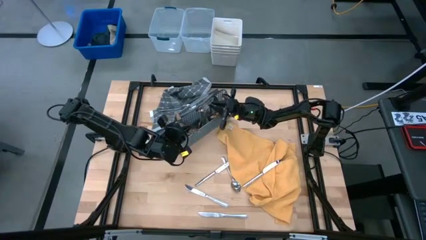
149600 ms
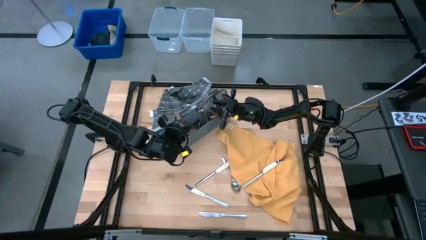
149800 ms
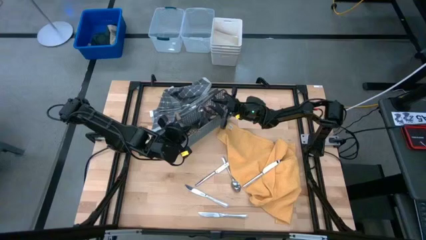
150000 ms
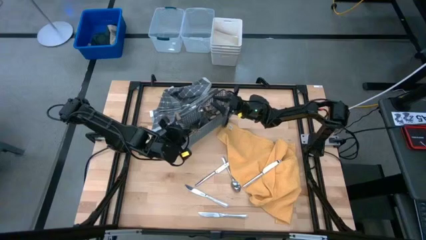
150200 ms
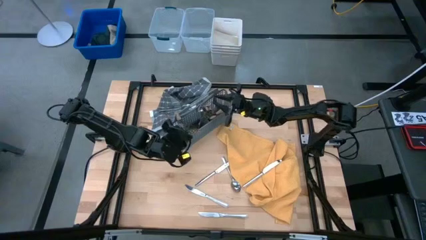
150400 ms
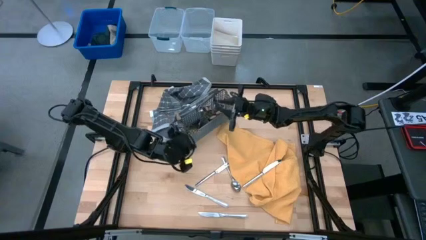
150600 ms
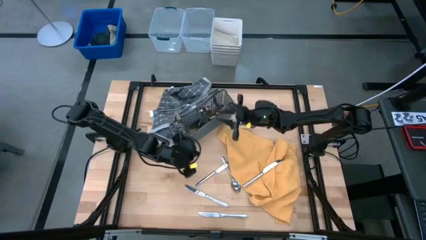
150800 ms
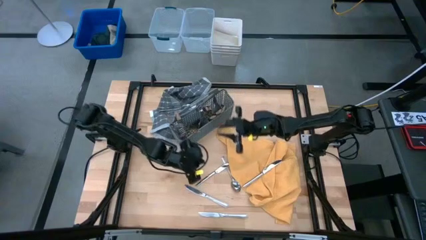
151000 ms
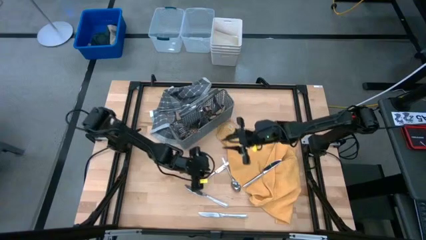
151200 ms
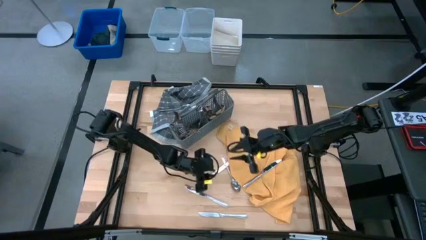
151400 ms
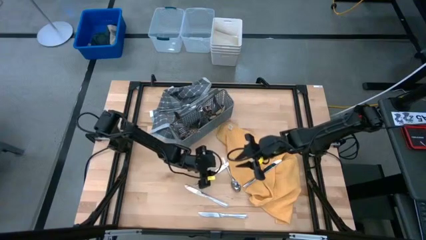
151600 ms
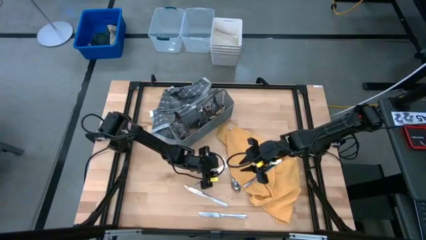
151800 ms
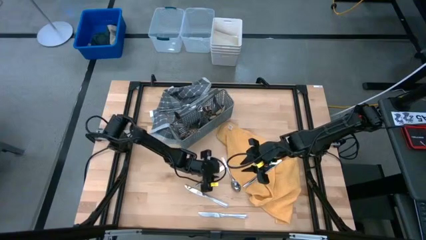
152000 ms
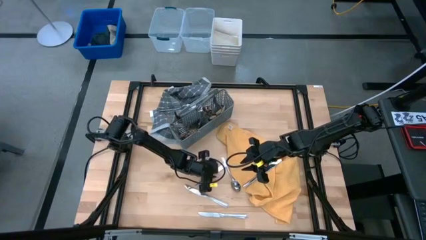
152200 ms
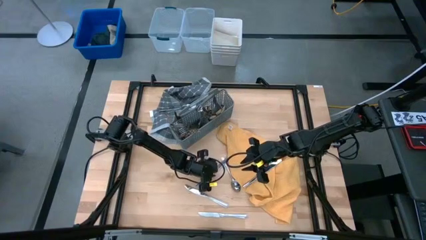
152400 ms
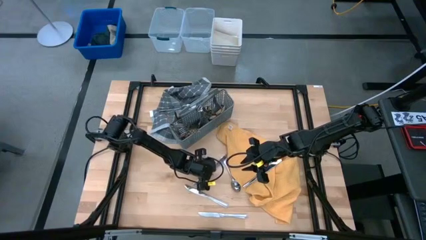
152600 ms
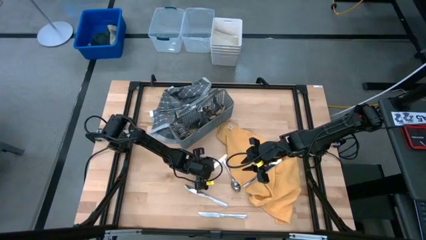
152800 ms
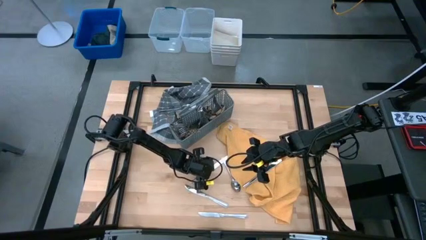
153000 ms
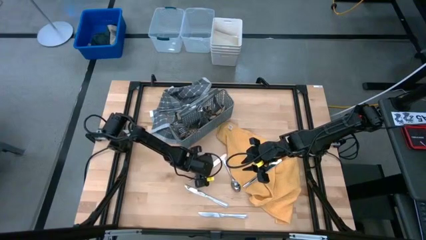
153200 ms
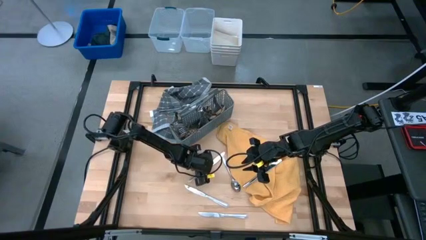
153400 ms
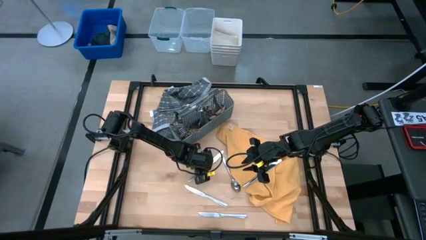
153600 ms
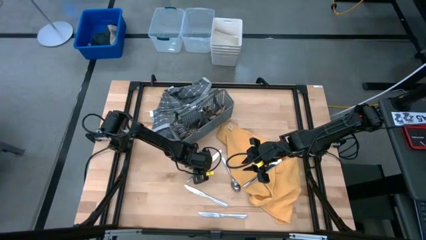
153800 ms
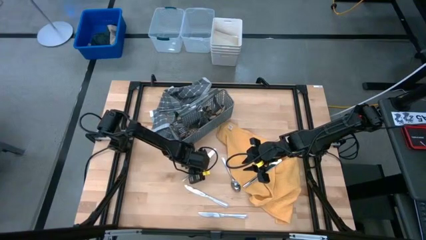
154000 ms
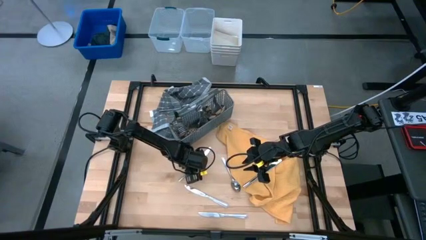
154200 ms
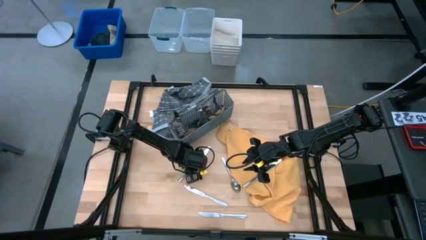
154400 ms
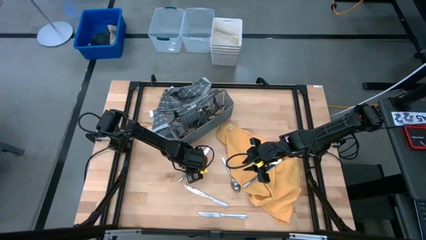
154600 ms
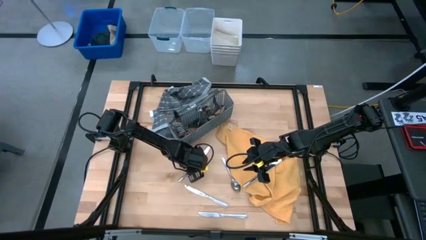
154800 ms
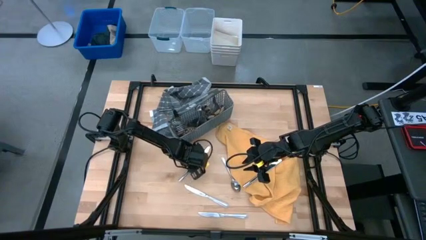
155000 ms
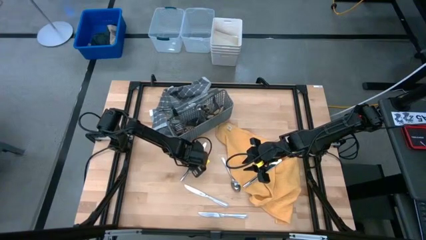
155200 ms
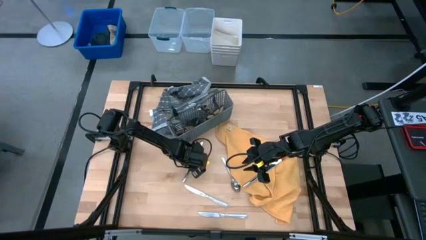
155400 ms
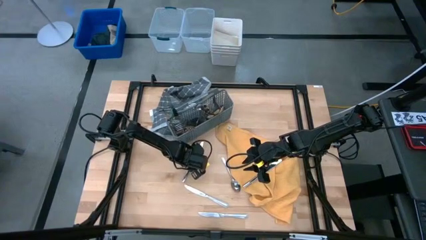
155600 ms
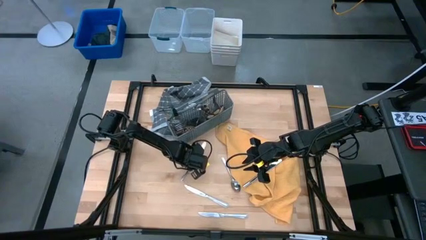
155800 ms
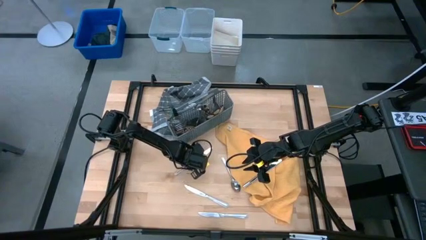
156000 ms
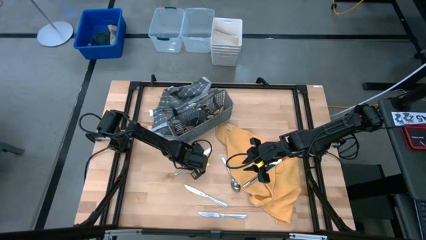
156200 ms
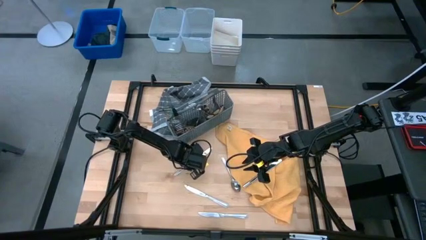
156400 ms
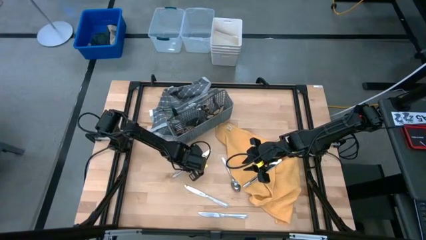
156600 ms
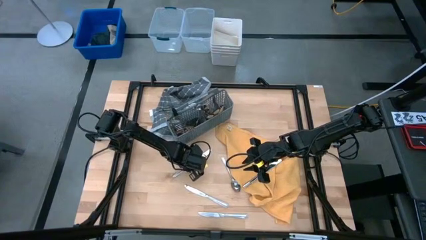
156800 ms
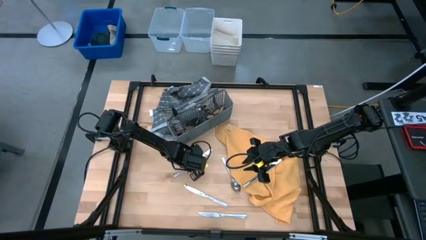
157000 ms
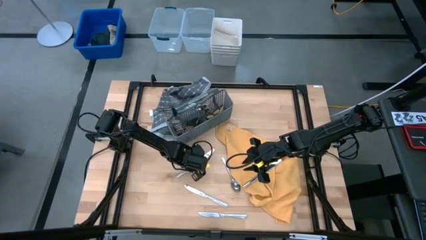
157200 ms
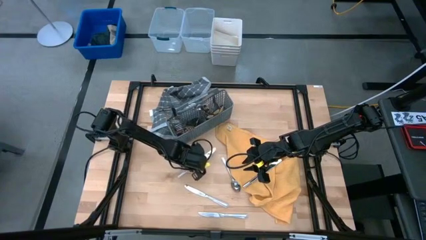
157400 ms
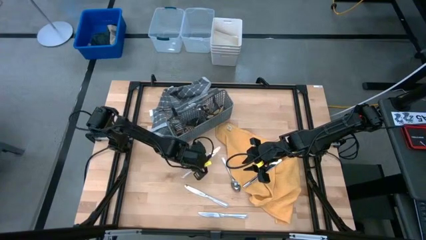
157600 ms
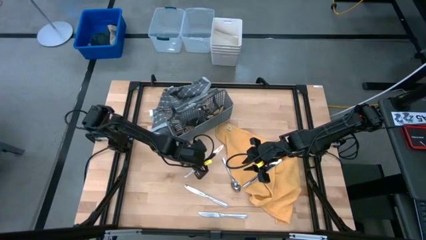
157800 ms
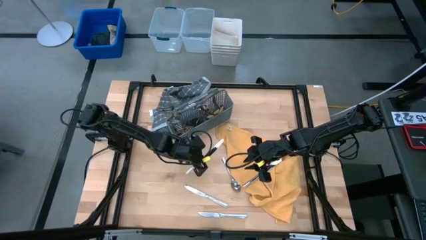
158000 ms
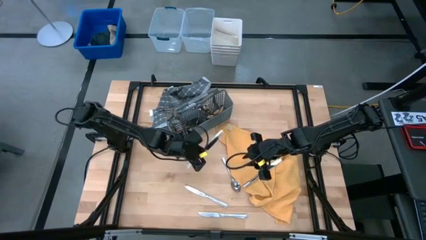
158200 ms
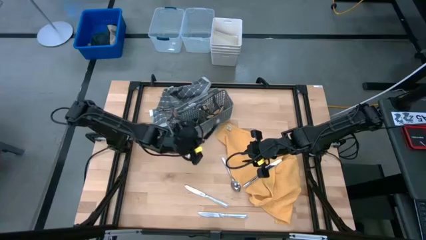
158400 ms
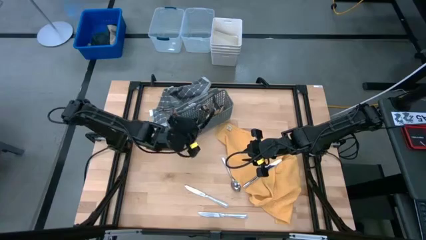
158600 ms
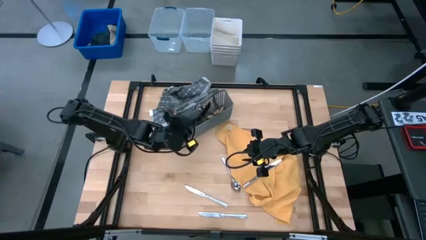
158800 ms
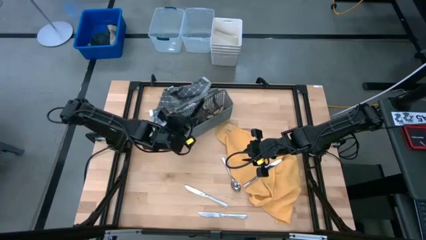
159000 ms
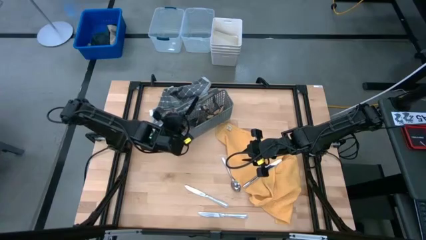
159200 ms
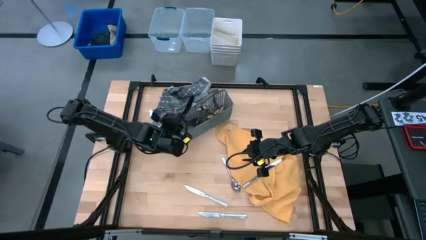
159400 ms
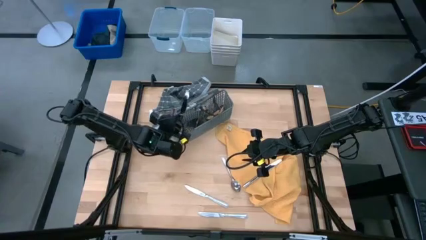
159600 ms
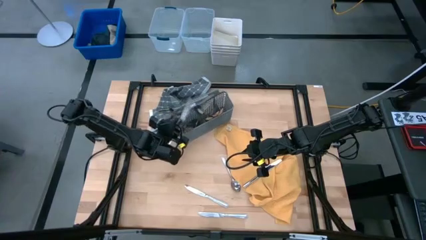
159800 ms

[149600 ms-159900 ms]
Task: Sort silverware
Put the silver knife into the gray silverware basket
